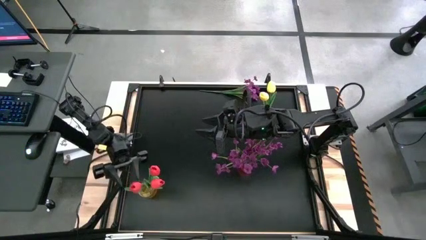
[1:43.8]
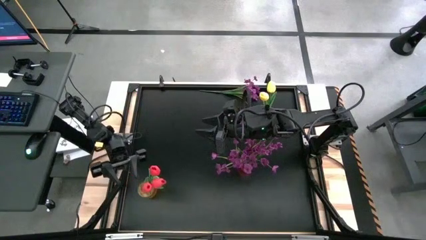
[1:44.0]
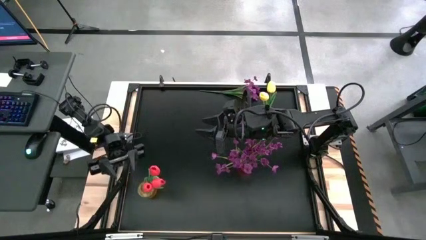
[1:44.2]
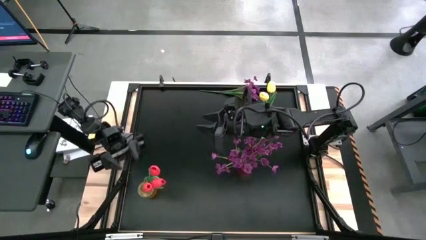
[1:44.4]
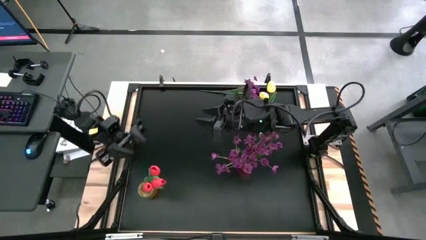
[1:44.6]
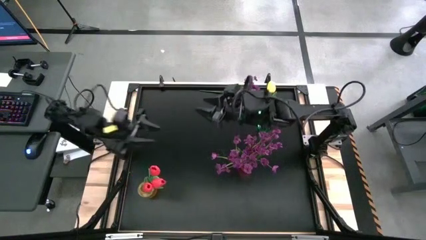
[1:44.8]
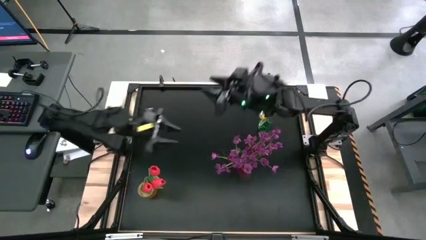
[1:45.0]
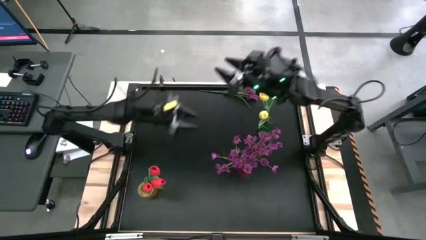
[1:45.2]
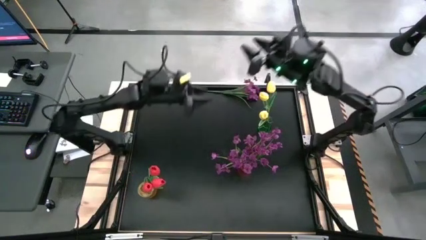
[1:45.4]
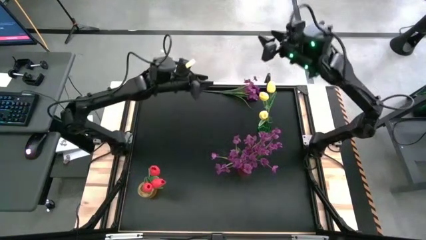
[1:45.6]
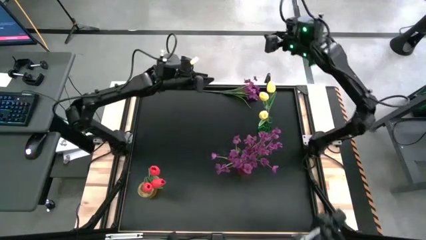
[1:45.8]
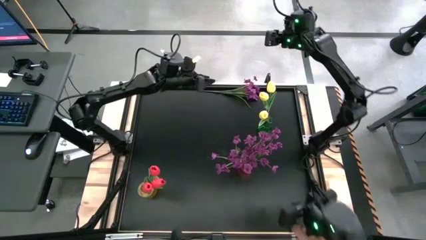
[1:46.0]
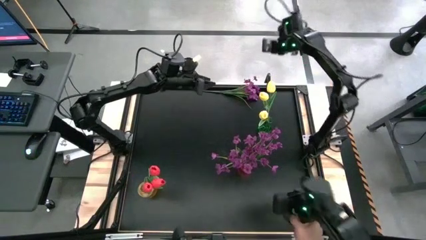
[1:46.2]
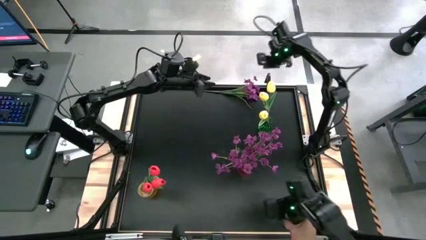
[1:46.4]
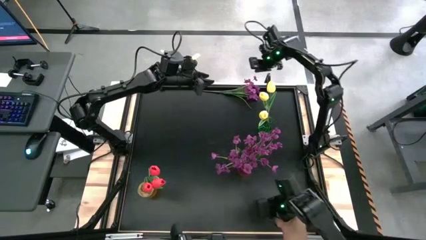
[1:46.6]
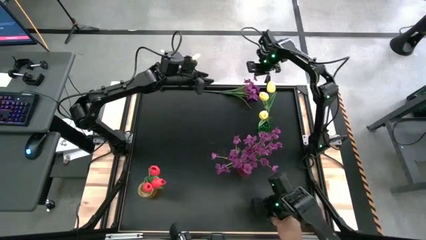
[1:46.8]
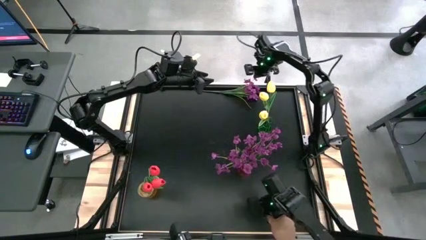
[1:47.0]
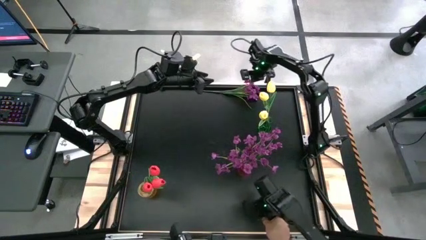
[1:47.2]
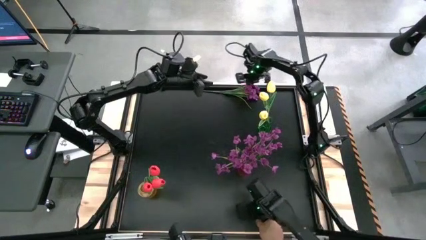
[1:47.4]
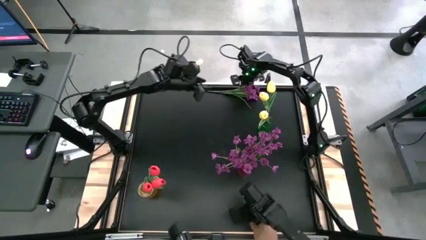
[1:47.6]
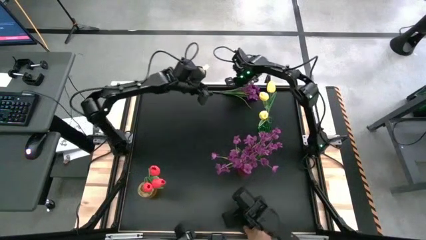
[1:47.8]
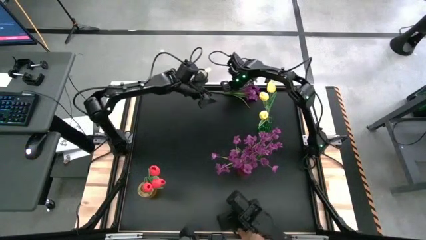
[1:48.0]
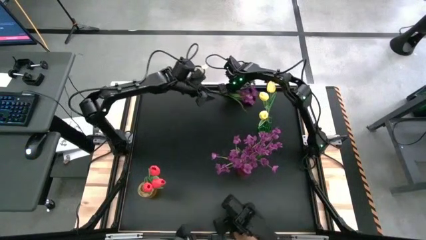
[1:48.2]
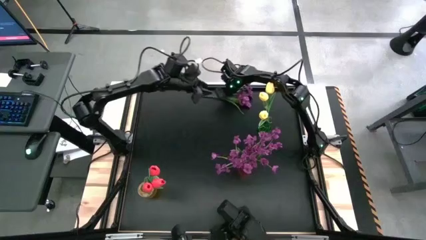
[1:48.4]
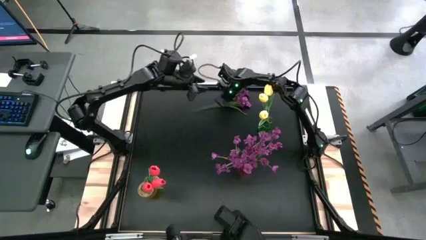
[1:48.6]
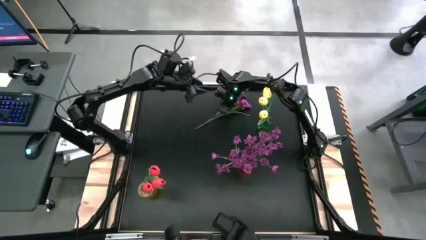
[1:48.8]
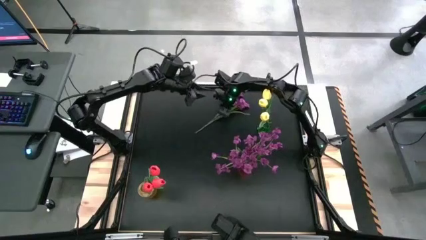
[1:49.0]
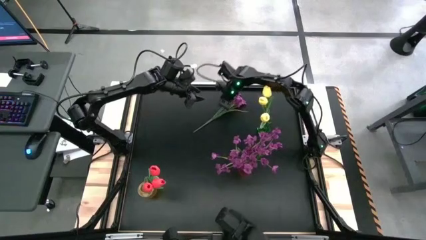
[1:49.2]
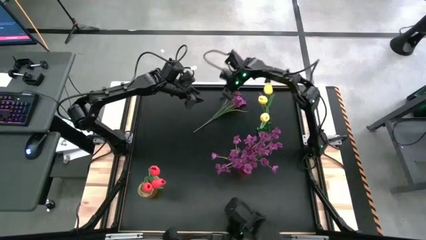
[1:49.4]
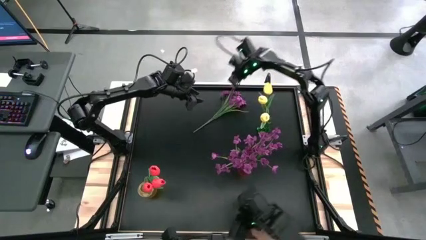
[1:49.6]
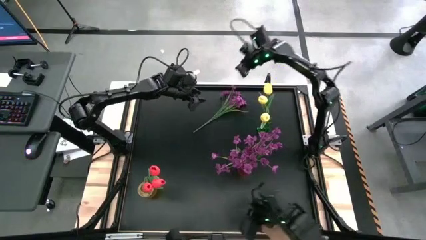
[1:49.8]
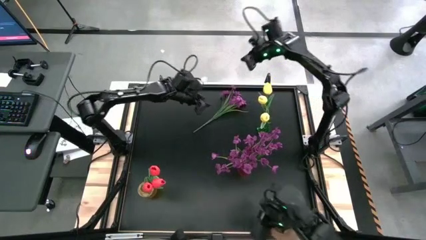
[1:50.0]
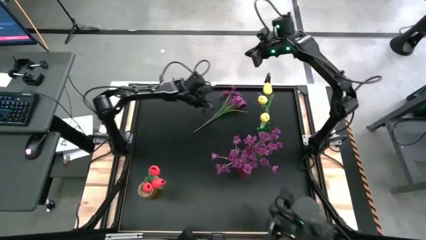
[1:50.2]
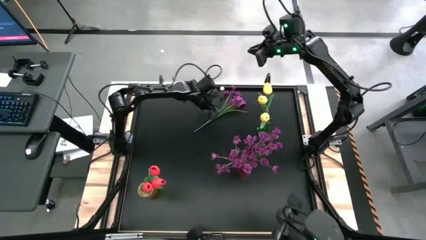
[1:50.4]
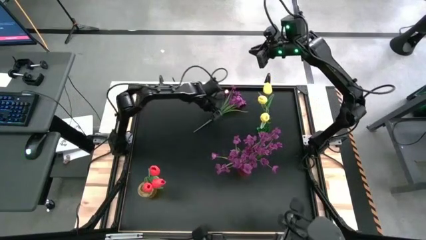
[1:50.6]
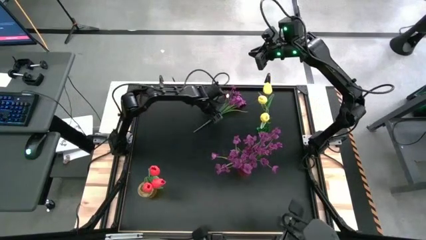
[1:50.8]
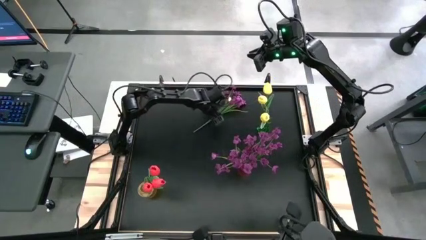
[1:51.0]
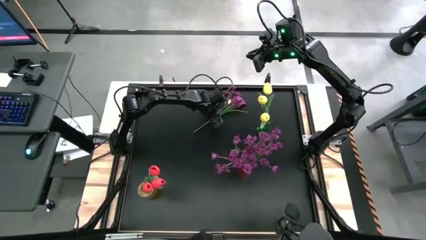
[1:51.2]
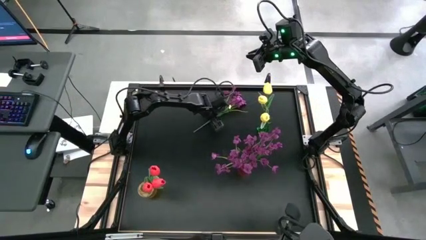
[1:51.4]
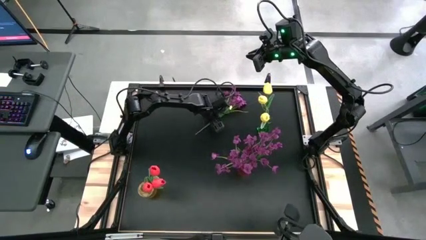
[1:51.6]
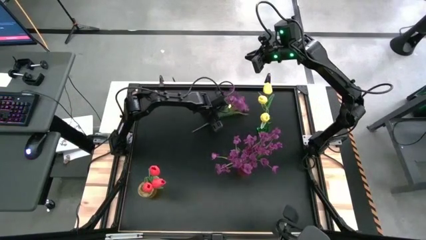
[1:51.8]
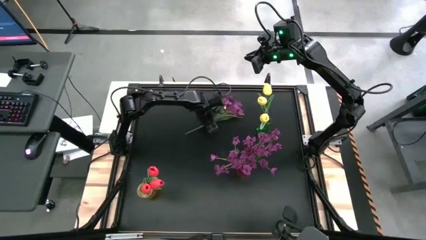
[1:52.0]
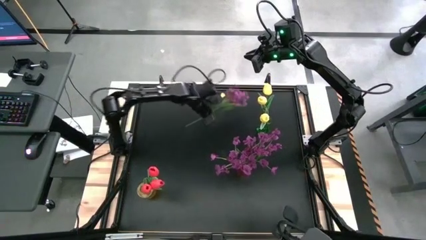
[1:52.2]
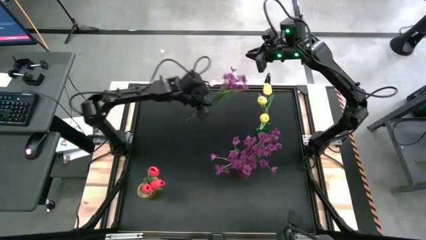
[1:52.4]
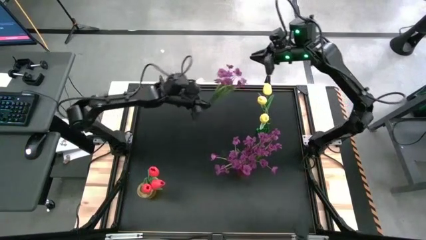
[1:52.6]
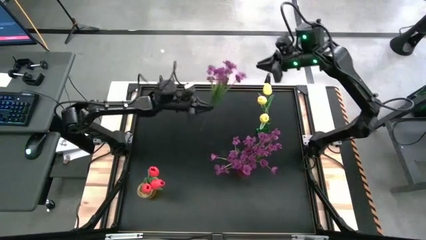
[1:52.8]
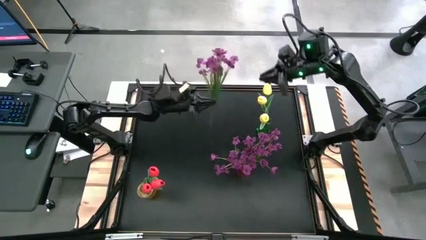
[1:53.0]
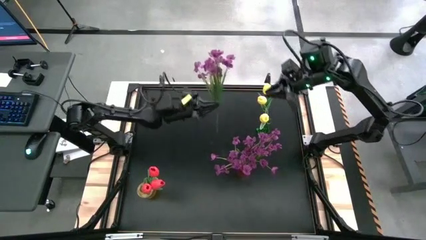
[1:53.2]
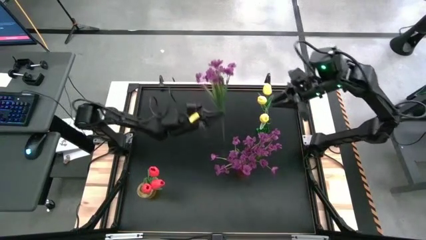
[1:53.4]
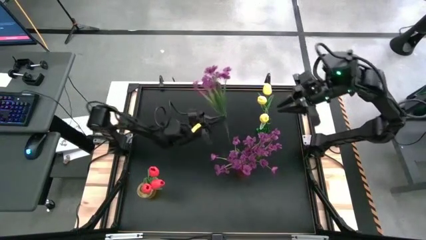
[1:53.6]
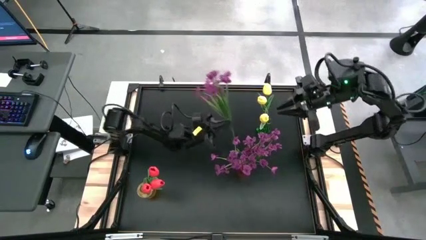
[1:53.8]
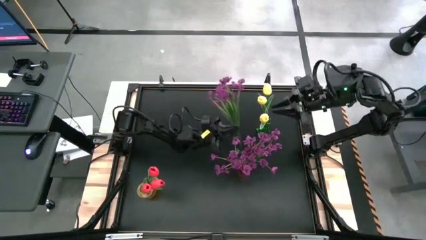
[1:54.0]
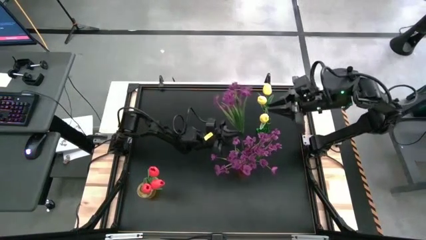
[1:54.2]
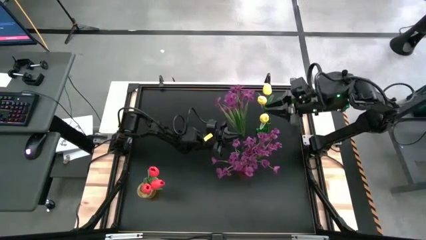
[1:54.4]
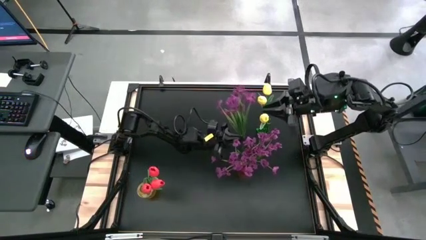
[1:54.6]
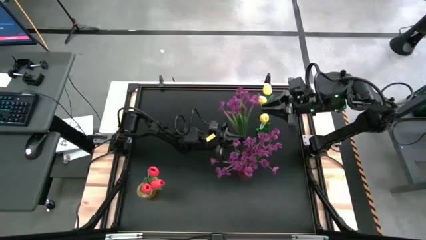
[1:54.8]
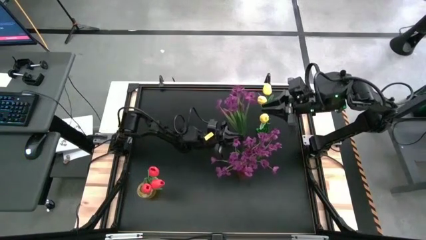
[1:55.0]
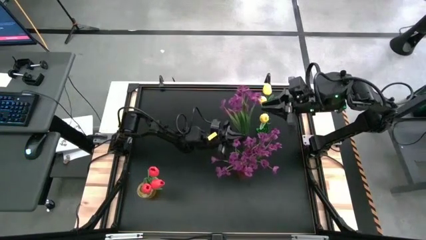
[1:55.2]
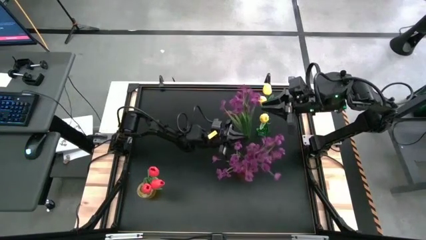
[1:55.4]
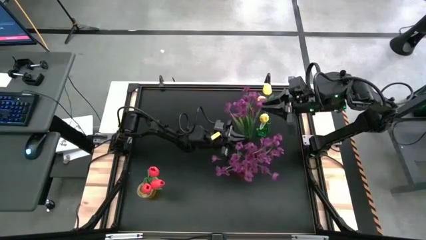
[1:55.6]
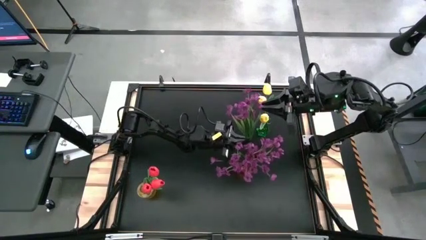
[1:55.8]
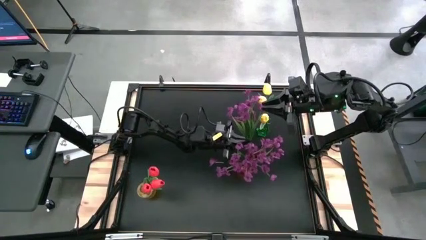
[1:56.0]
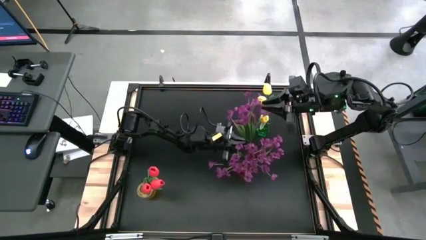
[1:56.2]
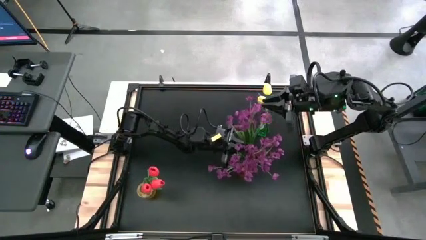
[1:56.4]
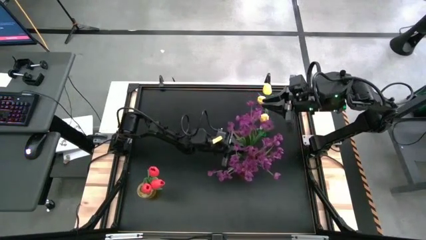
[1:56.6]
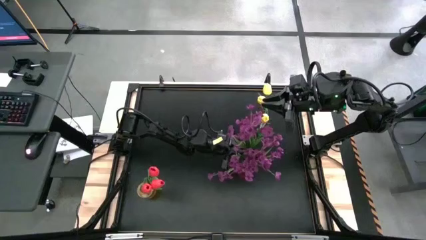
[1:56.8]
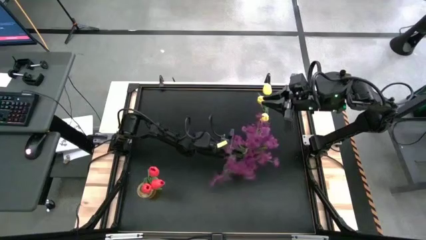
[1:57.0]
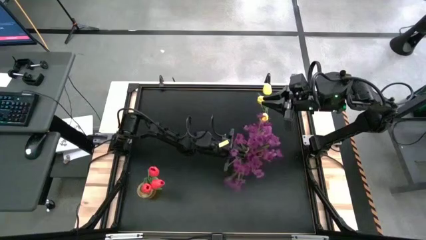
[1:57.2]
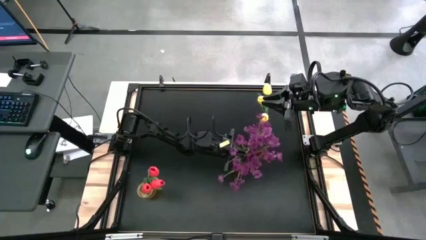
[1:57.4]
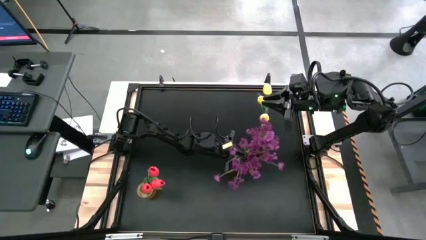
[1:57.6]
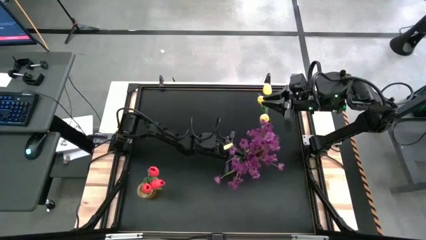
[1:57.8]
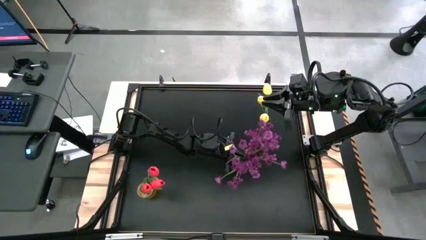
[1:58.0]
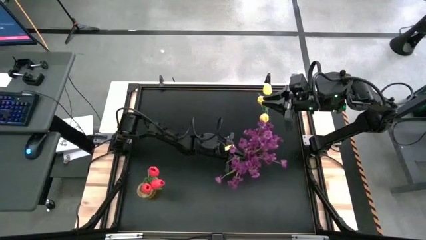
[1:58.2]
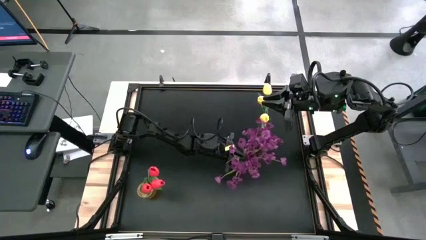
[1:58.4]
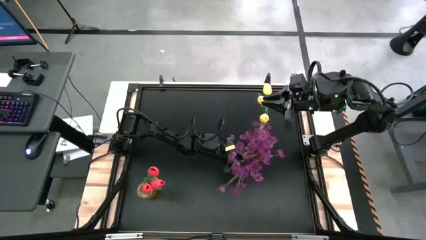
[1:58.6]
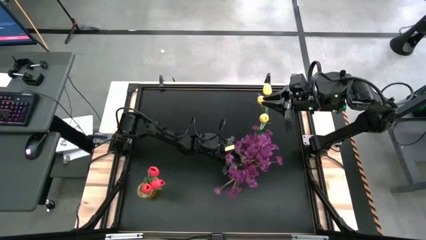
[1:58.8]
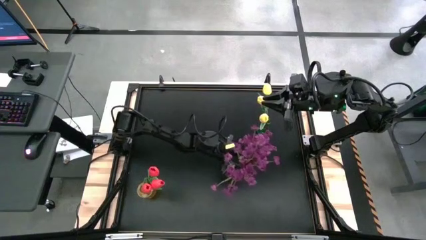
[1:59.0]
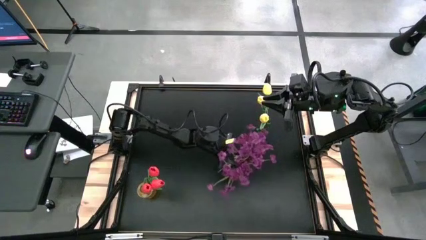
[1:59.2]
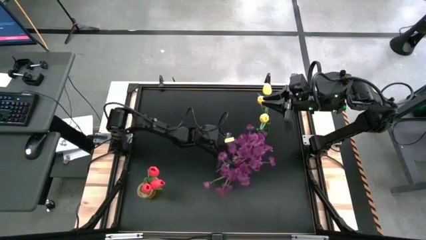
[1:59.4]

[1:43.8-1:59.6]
Task: Sort flowers into vase by color
Put the purple flowers into the red flower vase
